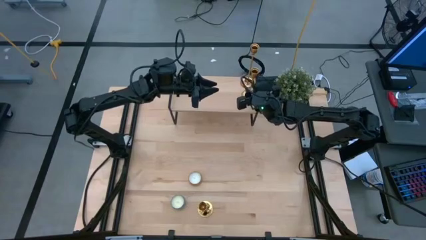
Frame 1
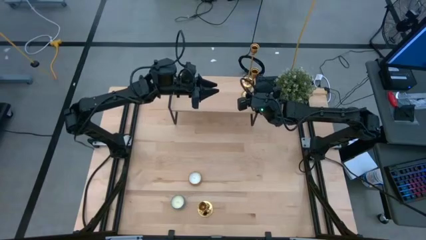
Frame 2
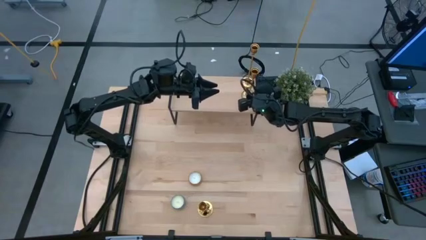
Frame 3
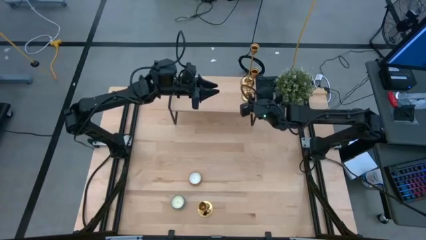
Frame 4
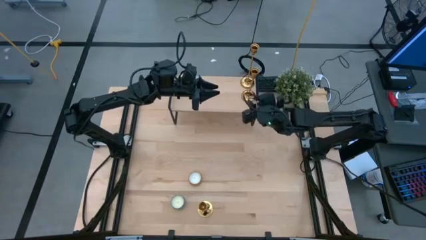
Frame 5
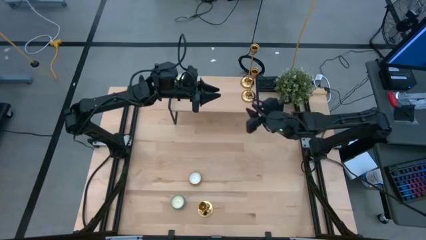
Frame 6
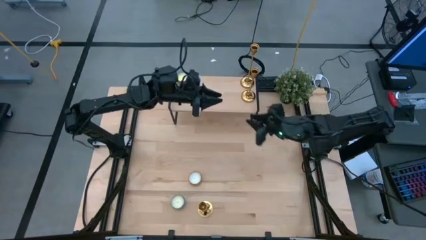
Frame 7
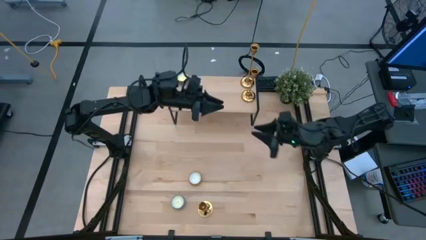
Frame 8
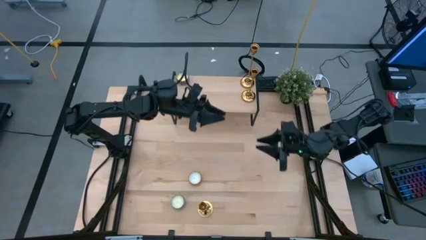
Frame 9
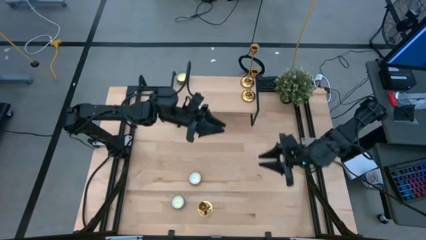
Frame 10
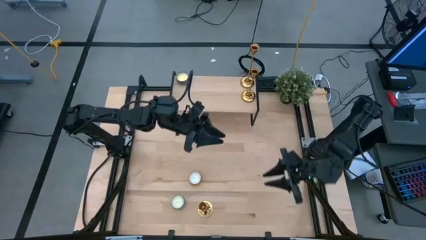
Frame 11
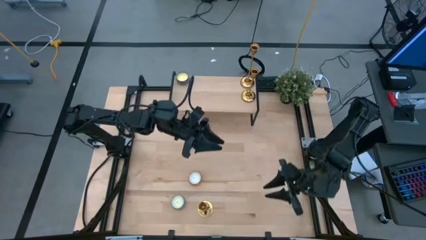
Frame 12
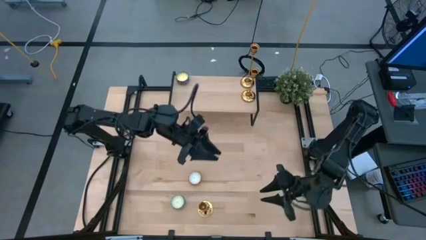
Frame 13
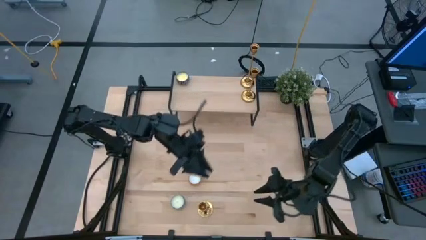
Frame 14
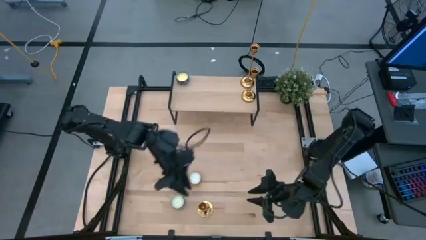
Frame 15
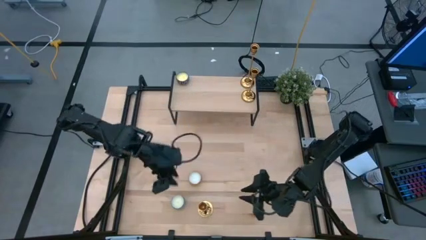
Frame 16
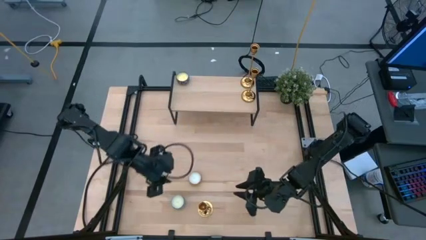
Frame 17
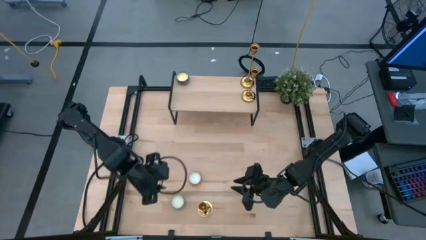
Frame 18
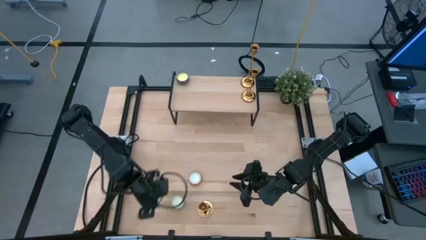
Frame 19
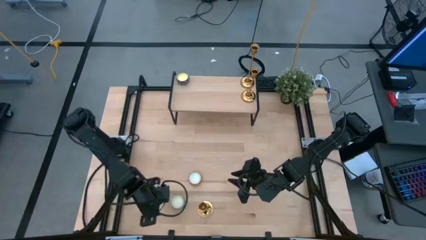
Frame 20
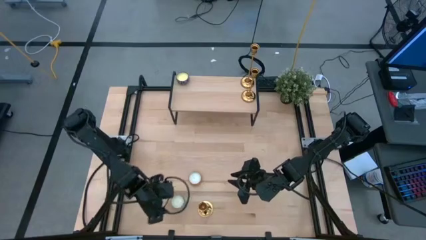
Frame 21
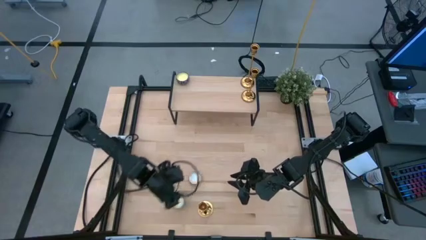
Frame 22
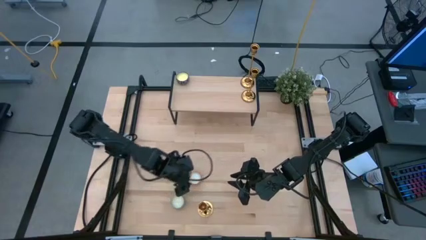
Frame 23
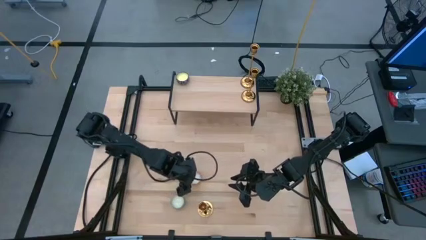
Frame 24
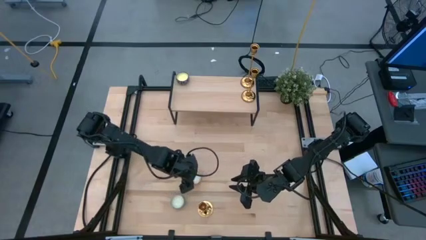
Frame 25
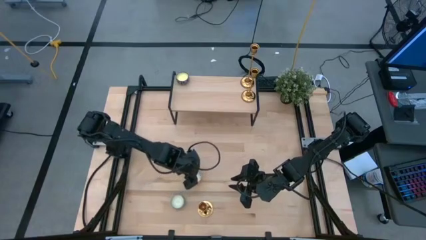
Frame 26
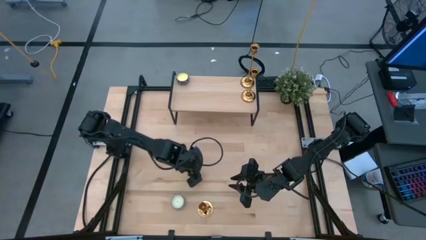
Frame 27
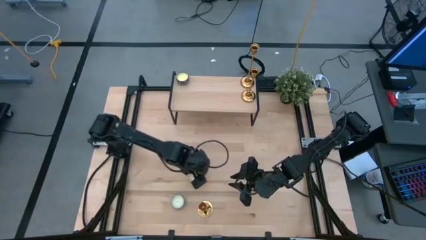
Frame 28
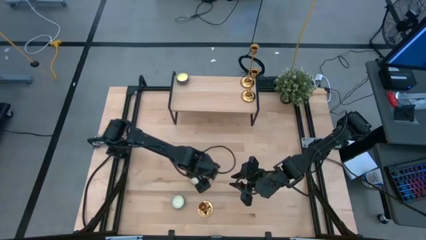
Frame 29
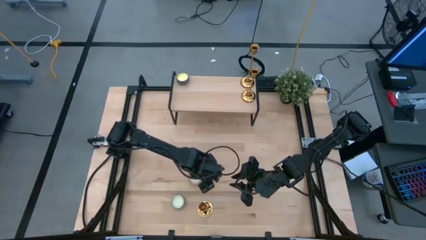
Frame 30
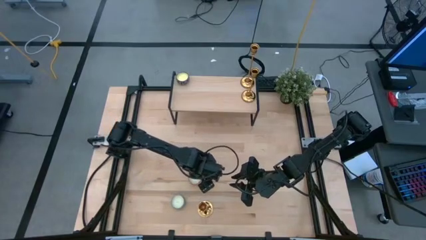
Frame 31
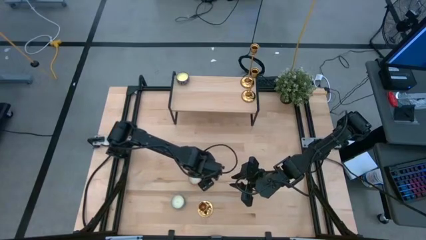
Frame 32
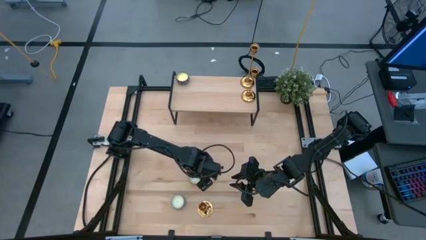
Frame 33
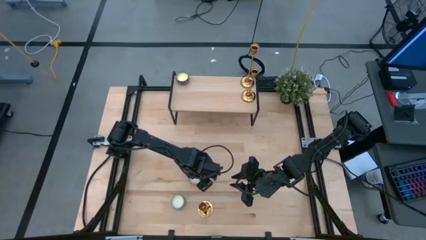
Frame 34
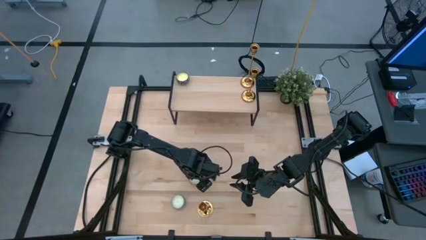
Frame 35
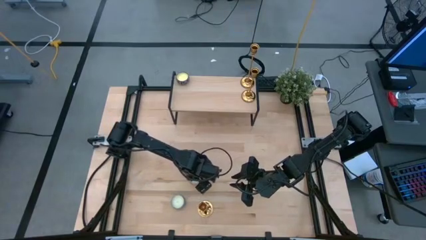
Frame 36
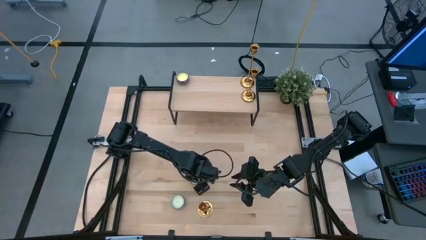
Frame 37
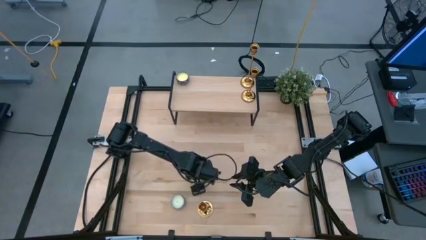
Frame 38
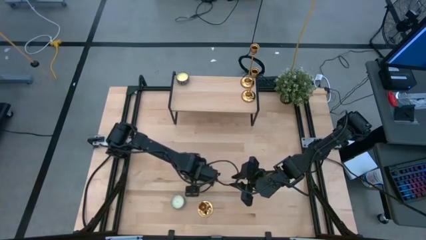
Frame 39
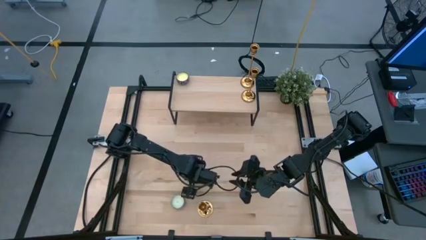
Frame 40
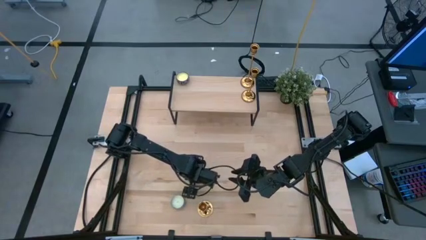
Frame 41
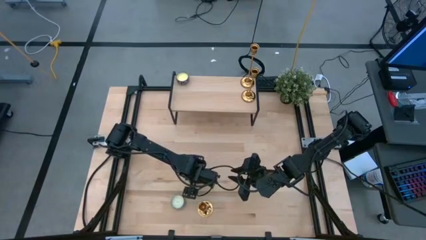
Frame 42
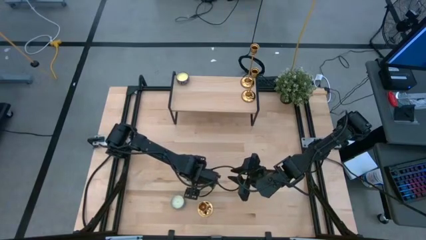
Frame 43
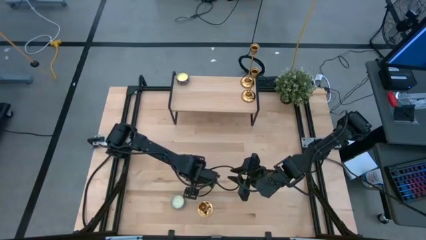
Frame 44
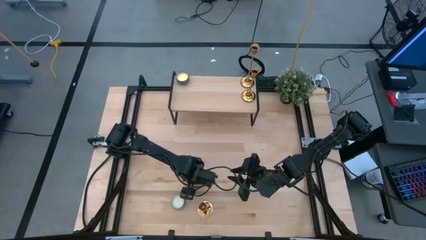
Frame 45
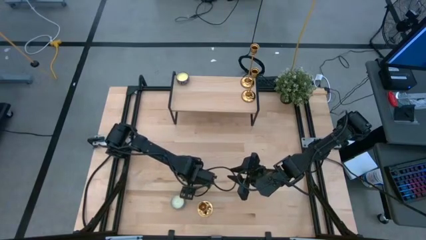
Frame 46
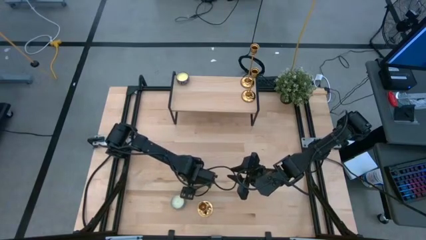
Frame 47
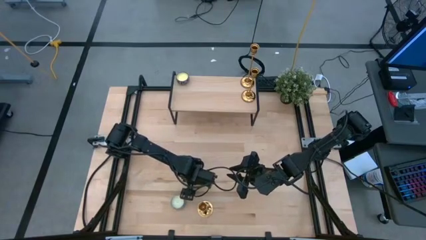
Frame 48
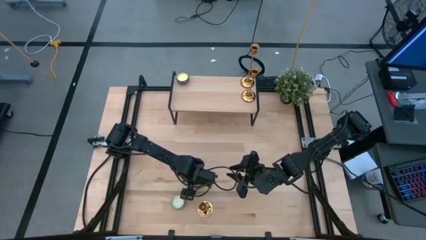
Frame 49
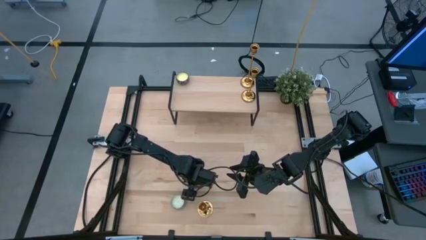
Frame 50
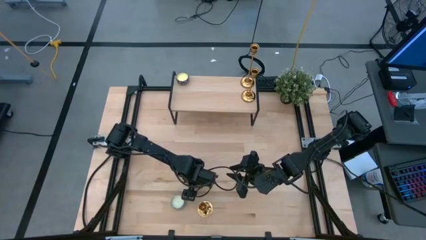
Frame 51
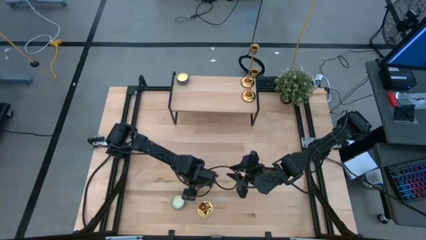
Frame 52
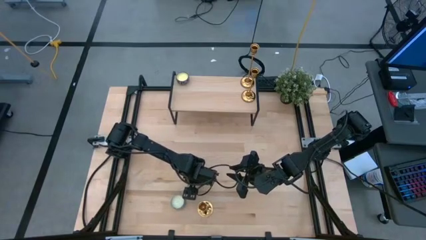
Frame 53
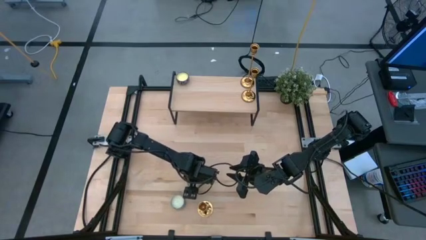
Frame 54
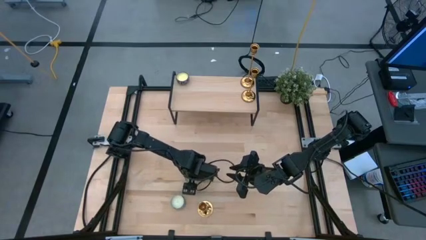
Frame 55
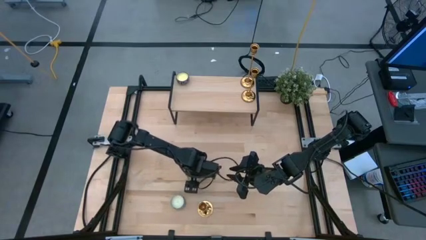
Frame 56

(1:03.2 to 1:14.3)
Task: Pick & Place candle stick holders
Put the yellow patterned scented candle on the shelf aligned with the black patterned scented candle
